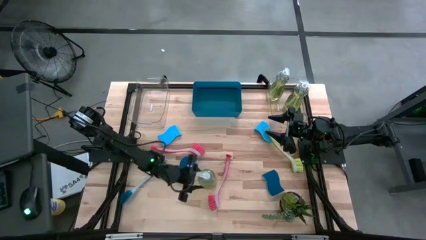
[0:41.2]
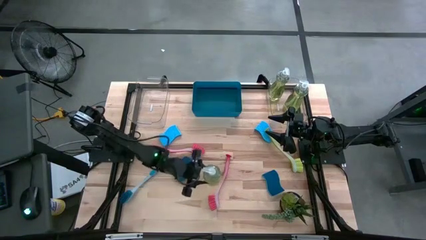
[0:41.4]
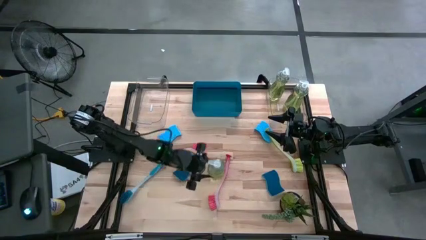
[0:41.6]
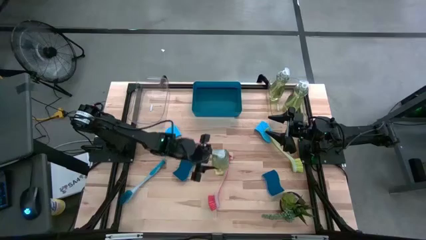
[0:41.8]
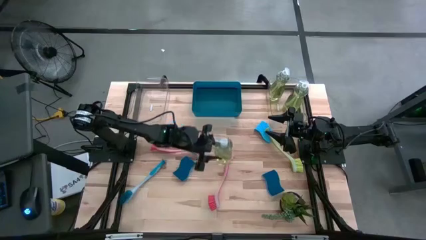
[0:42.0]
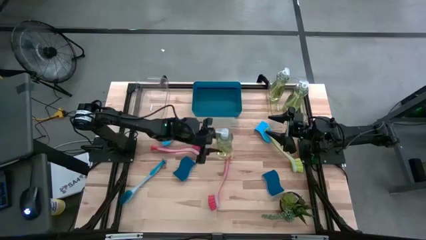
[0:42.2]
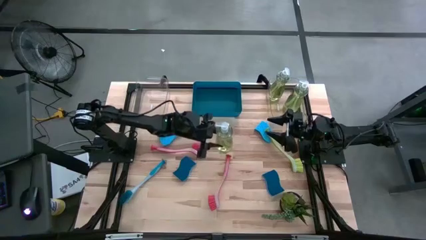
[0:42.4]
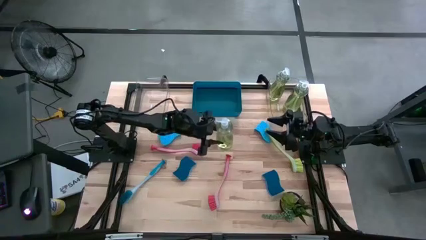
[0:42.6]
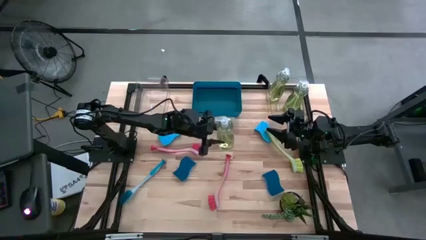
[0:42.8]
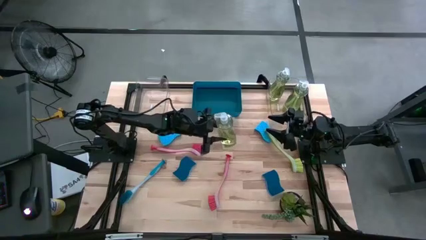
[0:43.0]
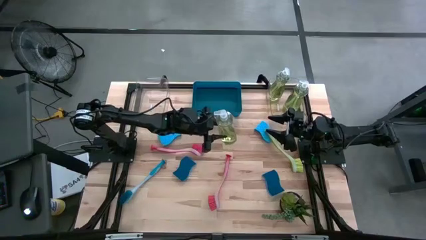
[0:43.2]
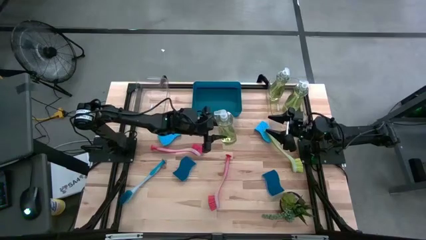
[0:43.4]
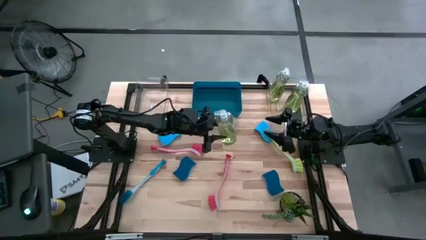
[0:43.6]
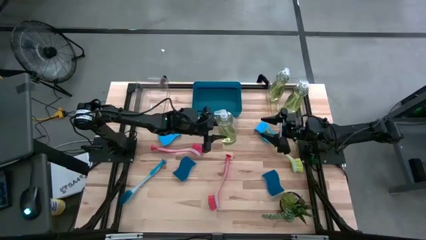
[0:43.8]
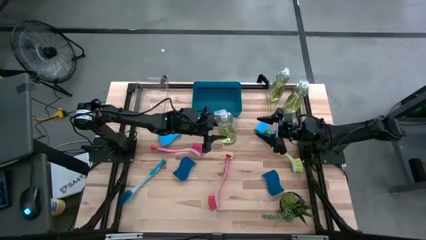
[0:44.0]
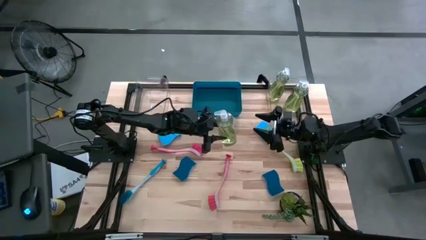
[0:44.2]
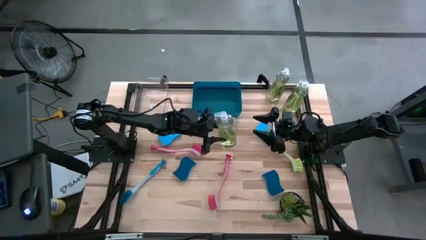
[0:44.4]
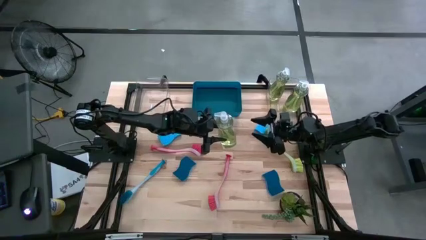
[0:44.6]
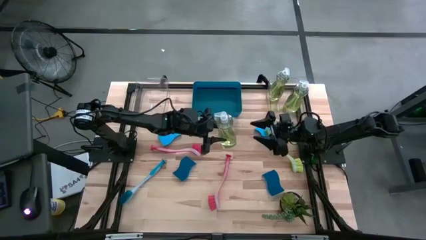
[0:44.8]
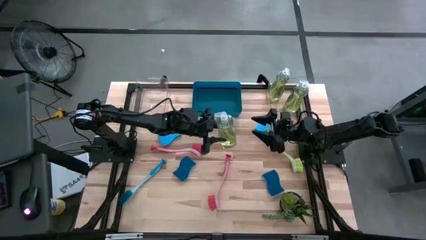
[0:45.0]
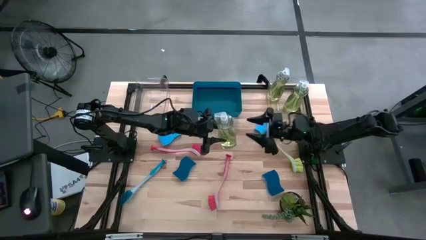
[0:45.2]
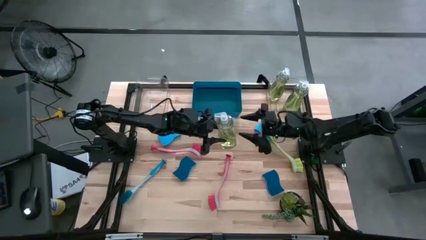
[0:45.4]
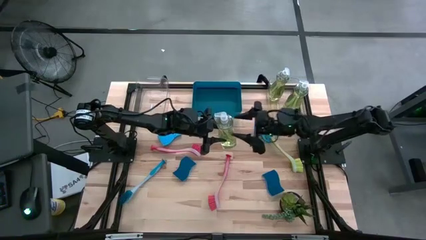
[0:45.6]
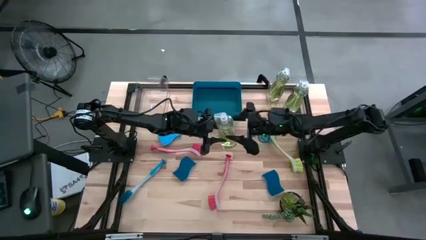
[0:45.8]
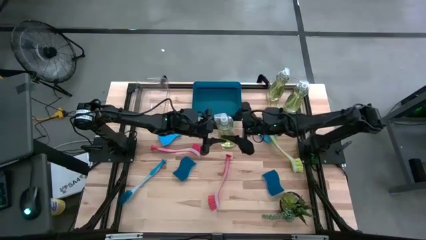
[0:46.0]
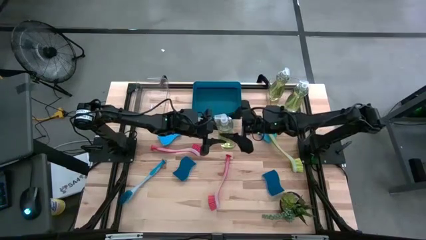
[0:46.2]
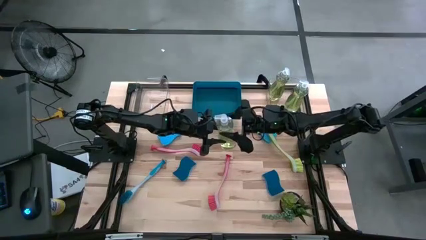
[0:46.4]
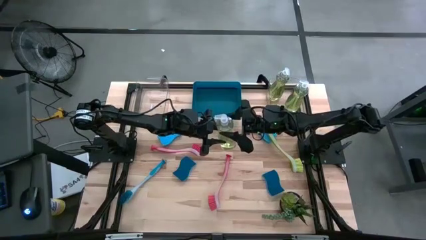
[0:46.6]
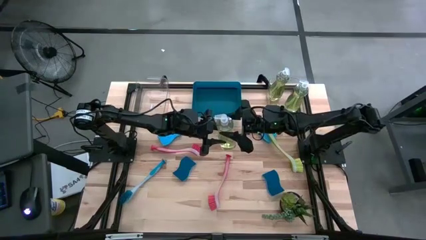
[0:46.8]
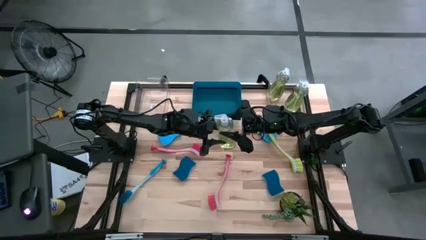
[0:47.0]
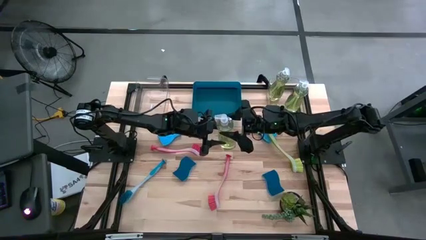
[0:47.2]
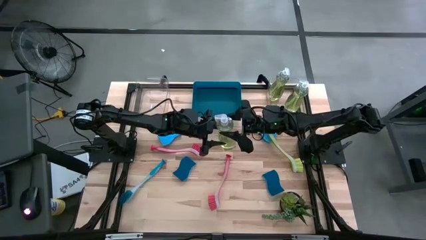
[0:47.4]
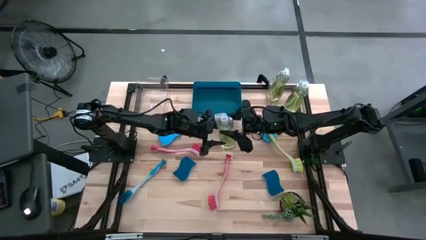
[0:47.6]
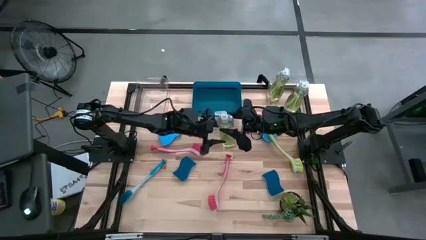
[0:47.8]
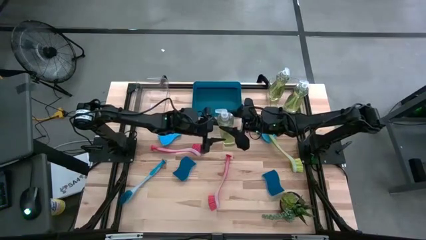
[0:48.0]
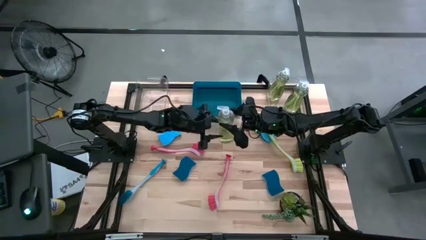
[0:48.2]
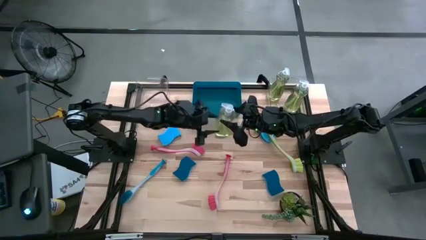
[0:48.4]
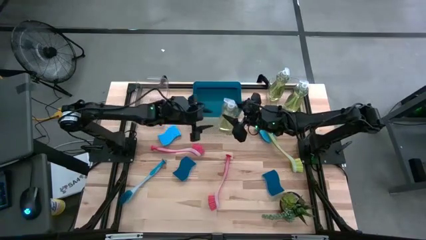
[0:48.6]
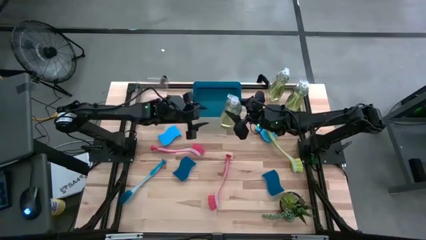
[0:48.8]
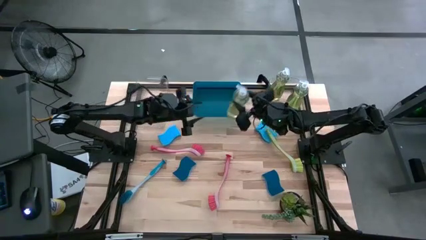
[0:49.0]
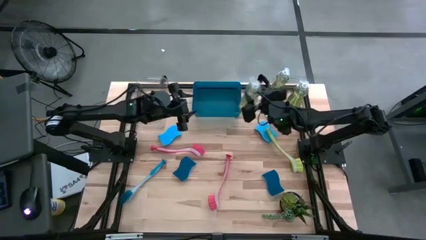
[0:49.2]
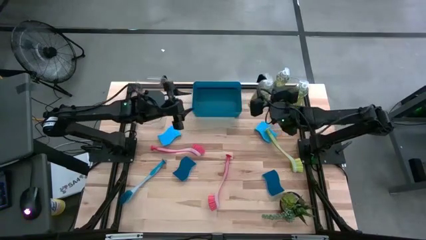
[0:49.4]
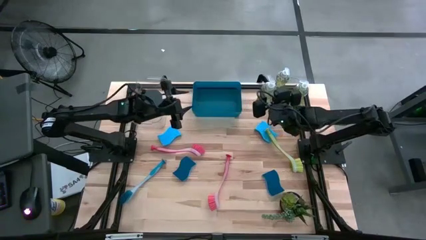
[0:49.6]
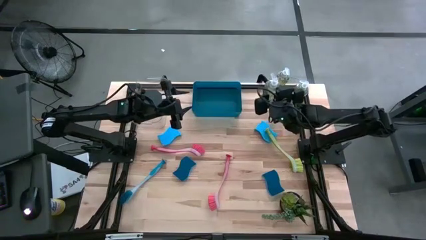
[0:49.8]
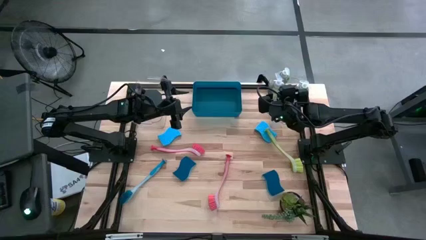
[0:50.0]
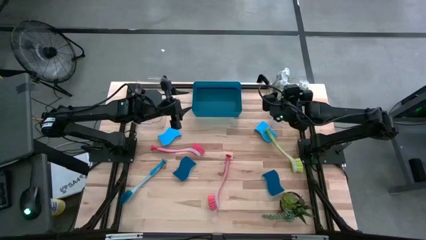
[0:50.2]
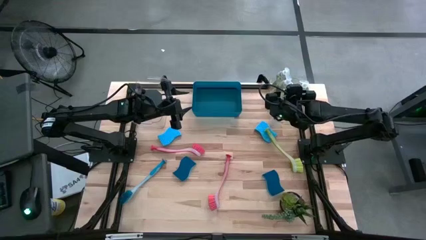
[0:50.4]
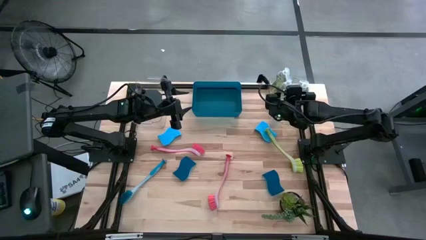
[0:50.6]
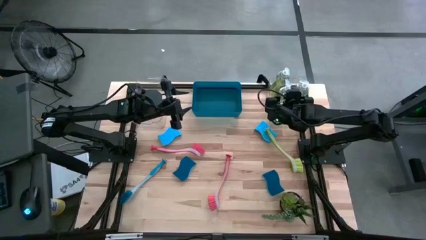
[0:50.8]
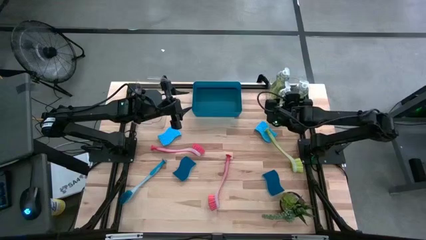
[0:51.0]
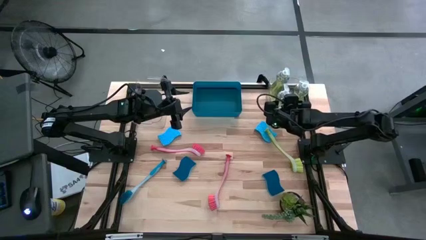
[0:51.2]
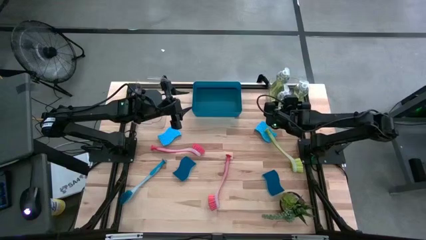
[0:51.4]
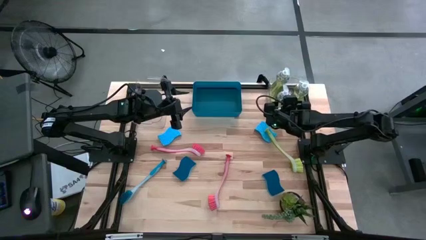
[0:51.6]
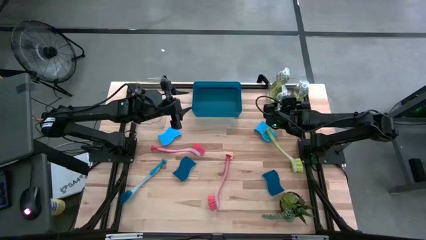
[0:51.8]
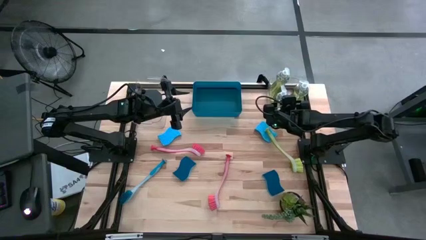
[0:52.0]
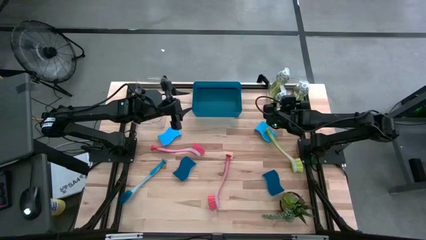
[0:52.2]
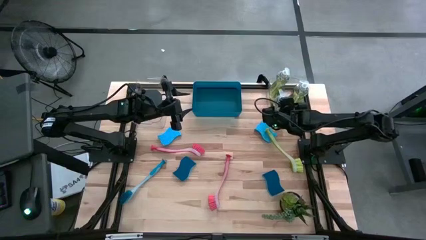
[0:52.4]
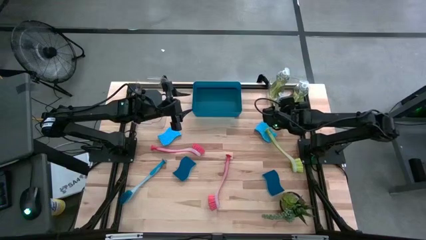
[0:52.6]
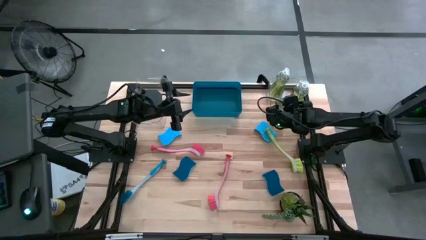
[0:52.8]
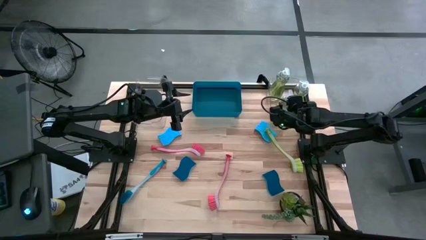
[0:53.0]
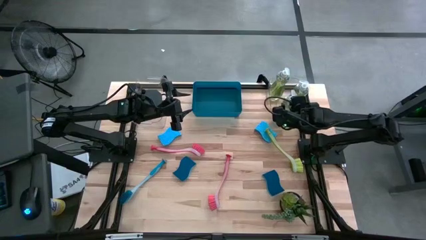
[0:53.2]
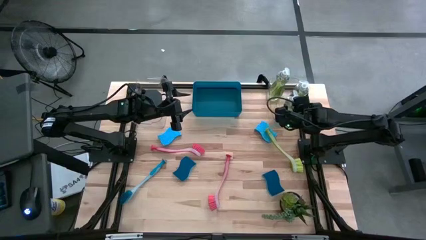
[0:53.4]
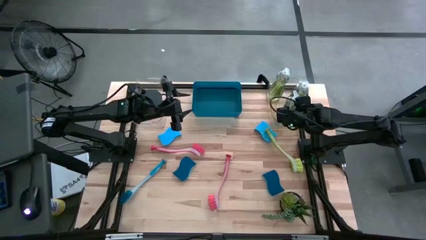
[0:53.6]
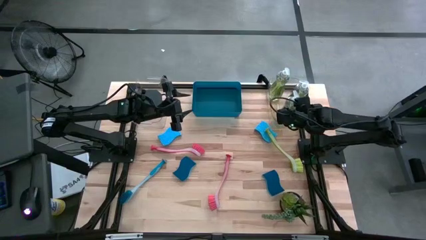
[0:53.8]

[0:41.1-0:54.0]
Task: Pick & Place Kitchen Sink Supplies
Put the green dish soap into the right transparent bin

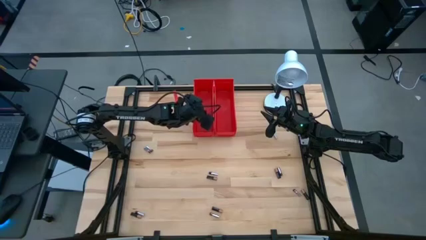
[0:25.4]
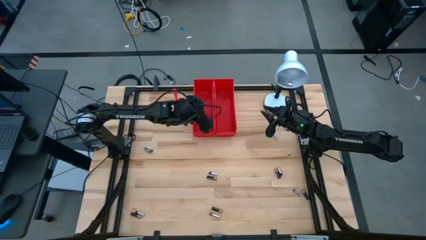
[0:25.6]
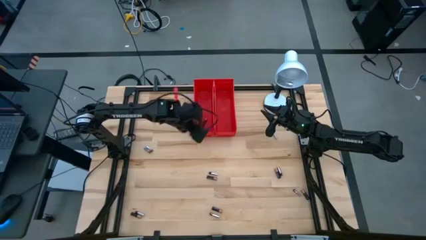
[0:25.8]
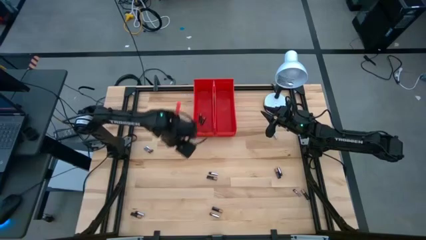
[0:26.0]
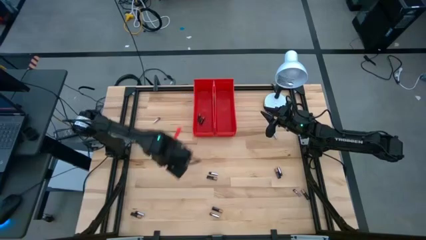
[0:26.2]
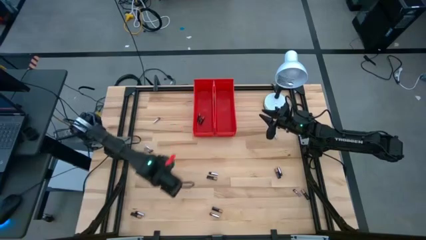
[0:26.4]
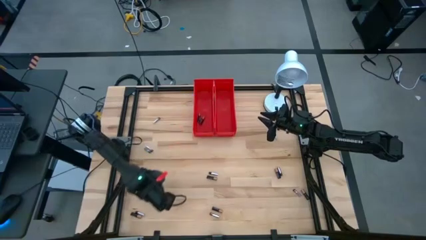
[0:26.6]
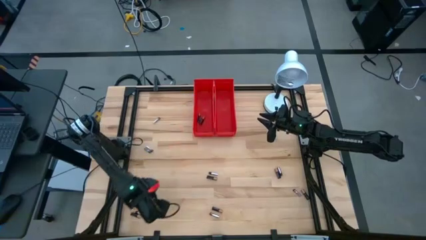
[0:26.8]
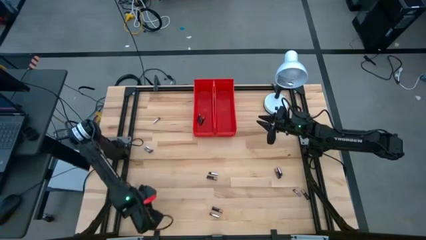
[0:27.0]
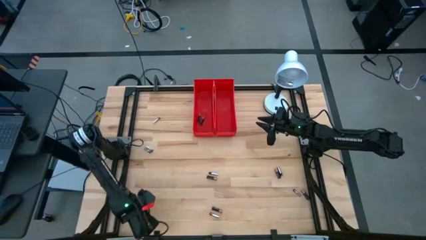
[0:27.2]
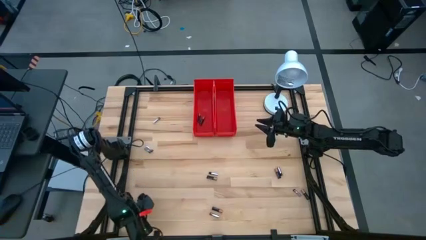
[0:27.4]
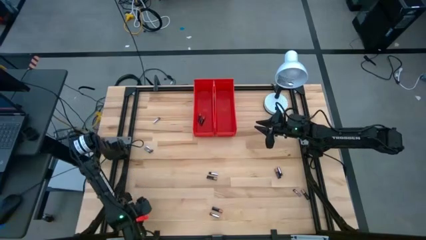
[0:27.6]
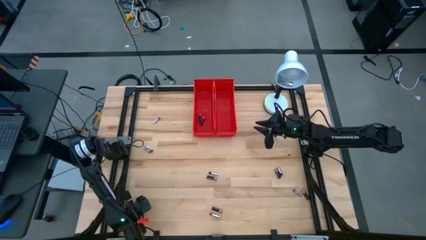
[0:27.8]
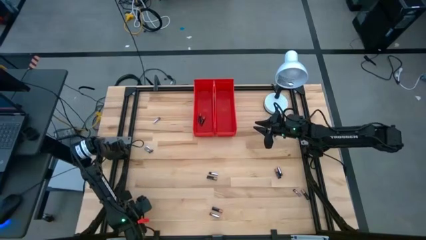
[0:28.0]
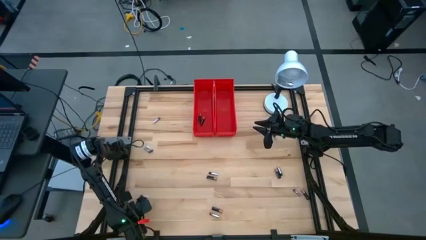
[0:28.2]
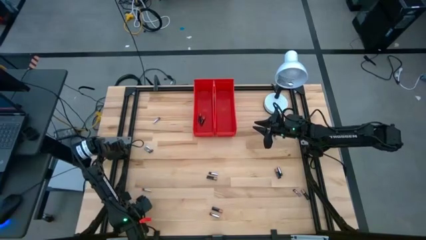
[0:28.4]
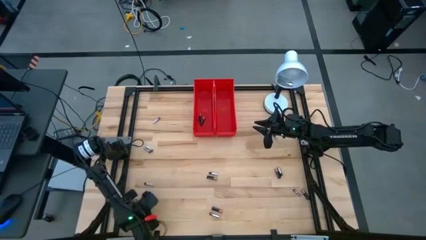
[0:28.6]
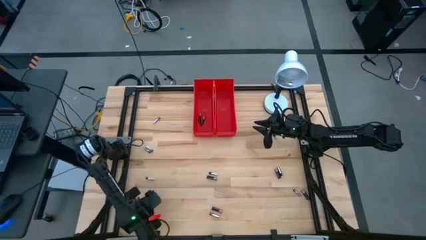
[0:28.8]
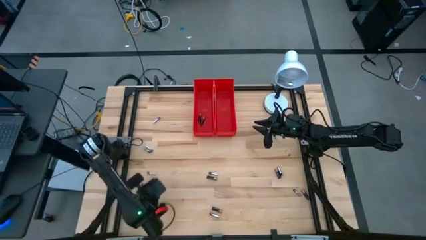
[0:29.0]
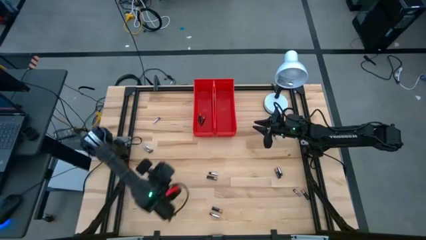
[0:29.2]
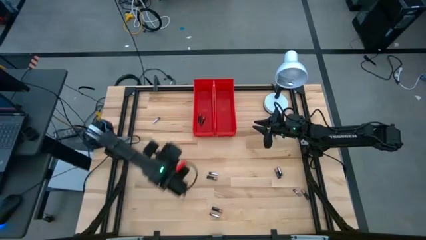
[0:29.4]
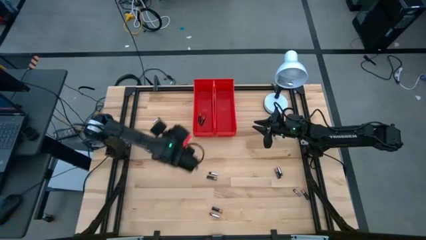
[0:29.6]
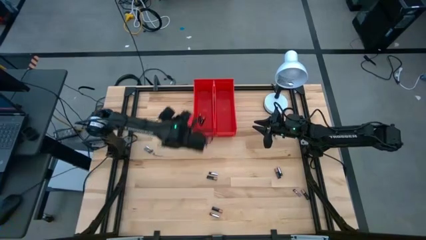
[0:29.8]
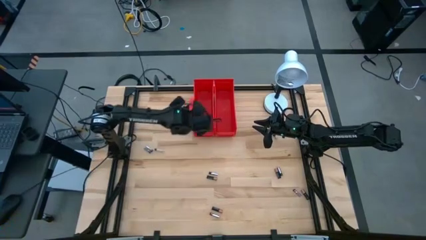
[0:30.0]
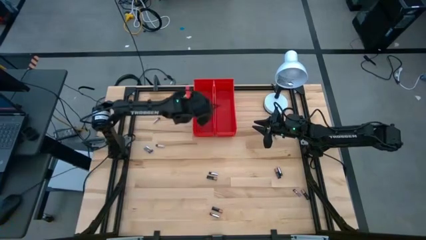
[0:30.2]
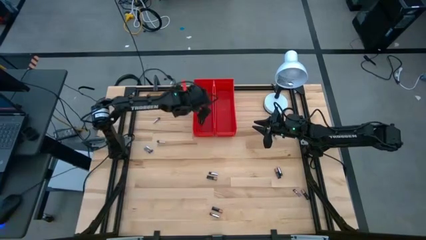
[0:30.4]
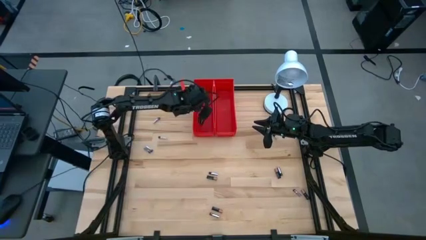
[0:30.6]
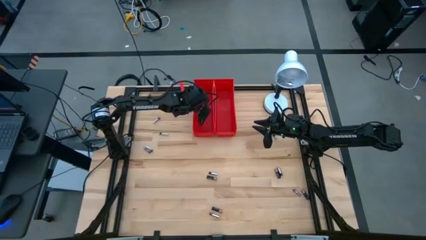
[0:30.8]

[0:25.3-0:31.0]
Task: Sort batteries
Put the black battery into the left red bin
